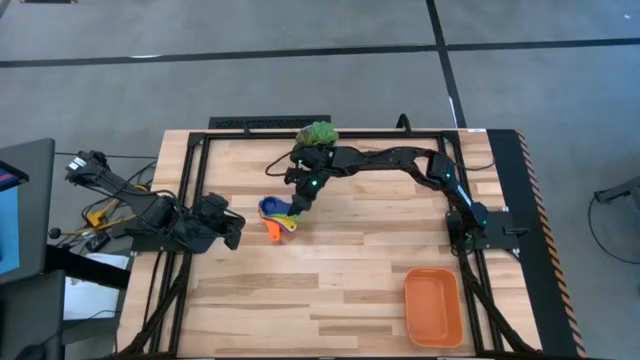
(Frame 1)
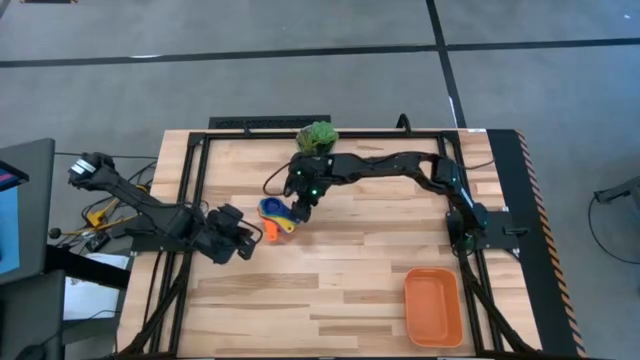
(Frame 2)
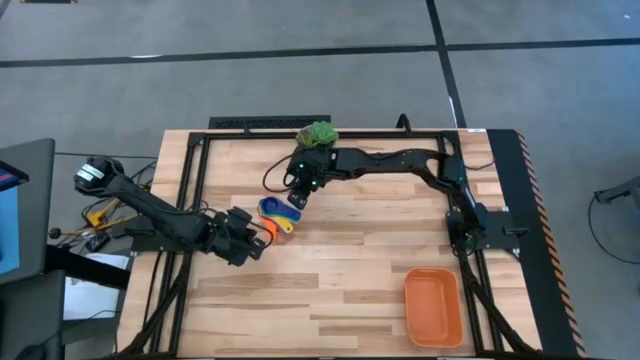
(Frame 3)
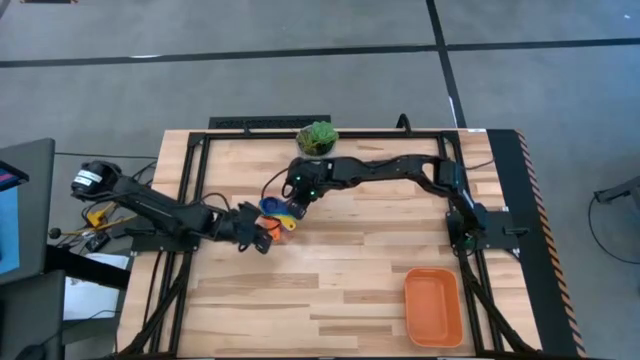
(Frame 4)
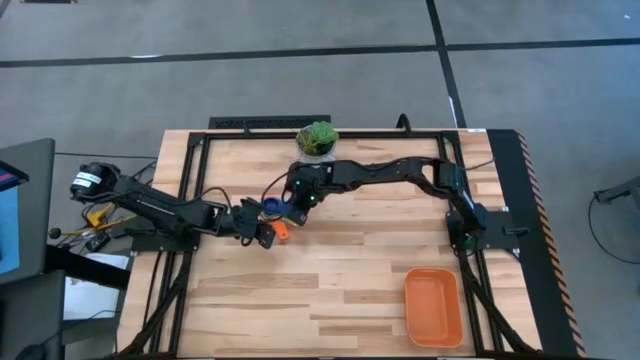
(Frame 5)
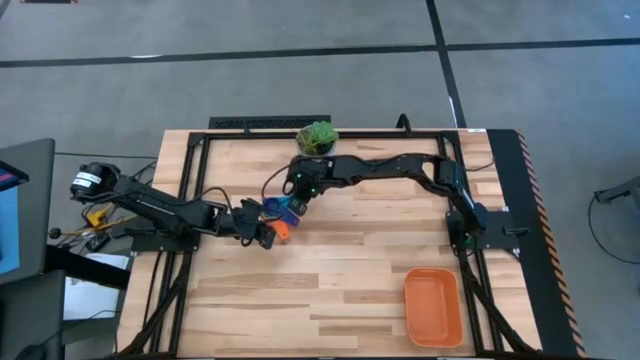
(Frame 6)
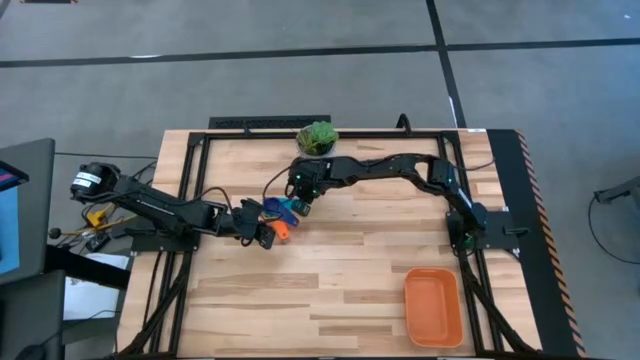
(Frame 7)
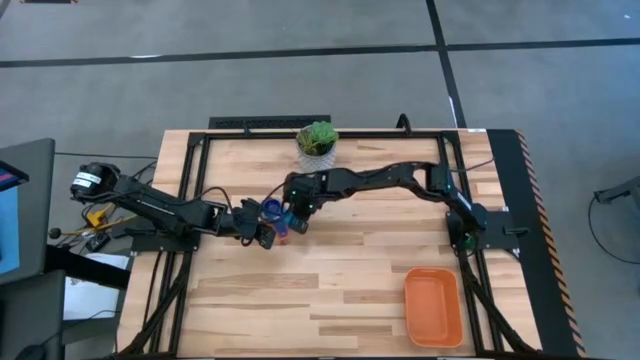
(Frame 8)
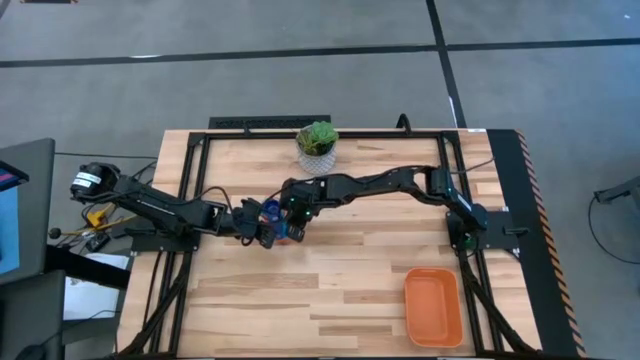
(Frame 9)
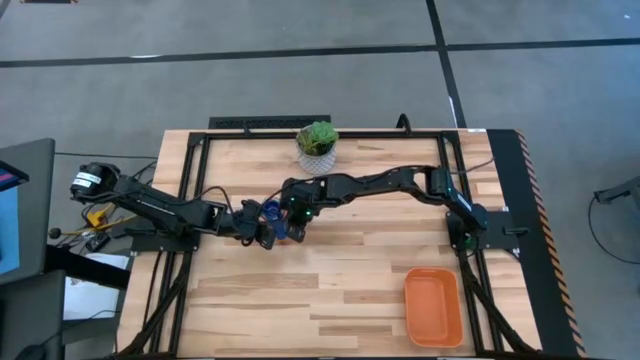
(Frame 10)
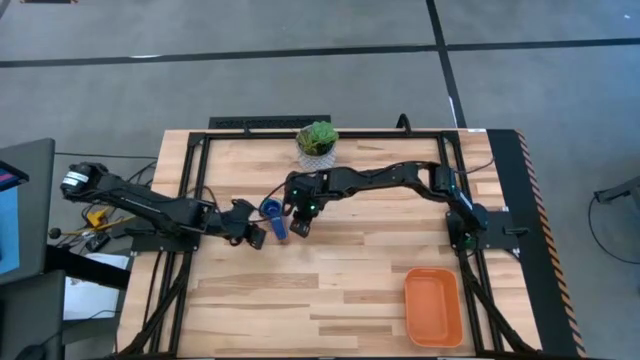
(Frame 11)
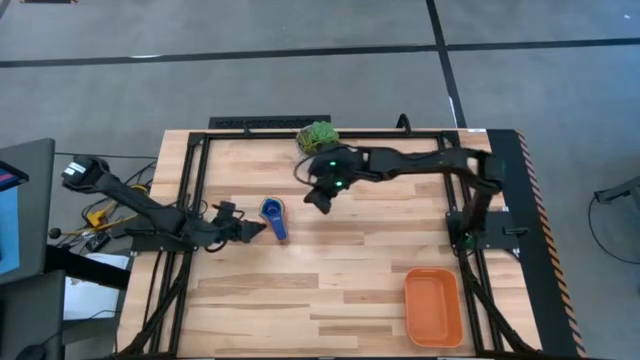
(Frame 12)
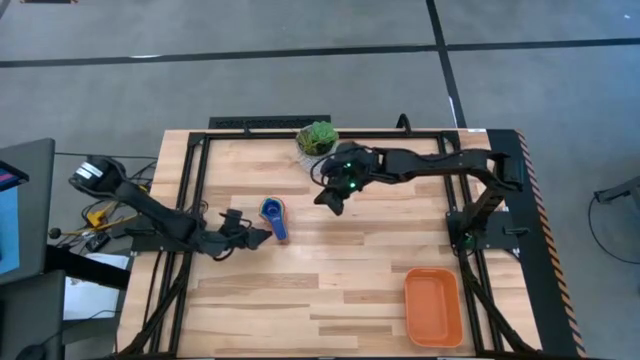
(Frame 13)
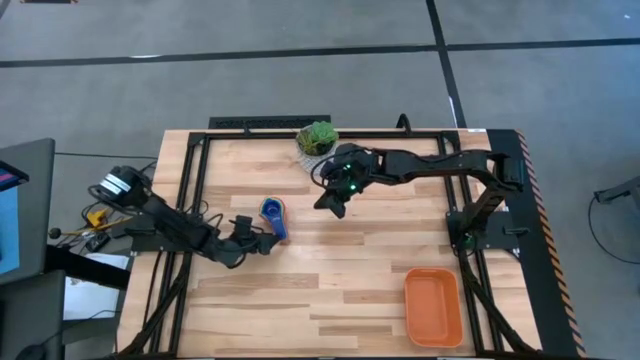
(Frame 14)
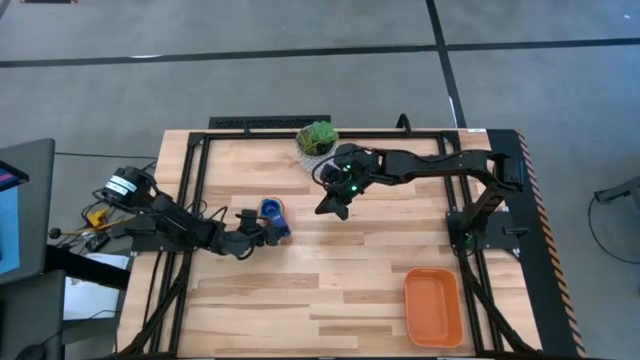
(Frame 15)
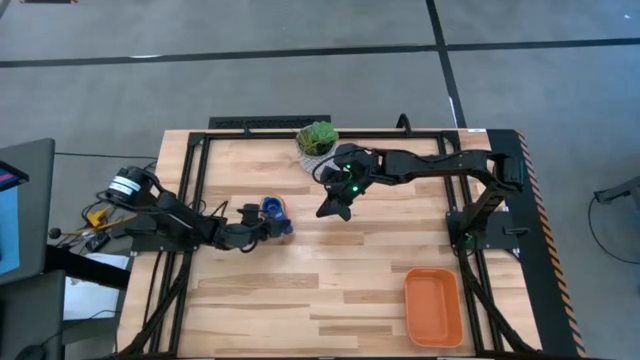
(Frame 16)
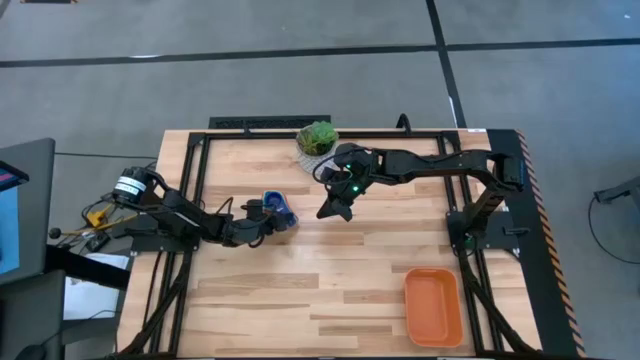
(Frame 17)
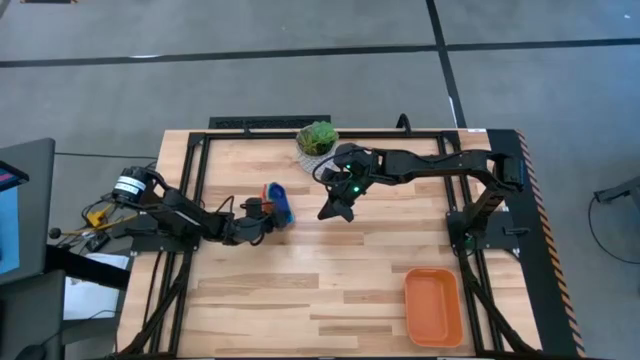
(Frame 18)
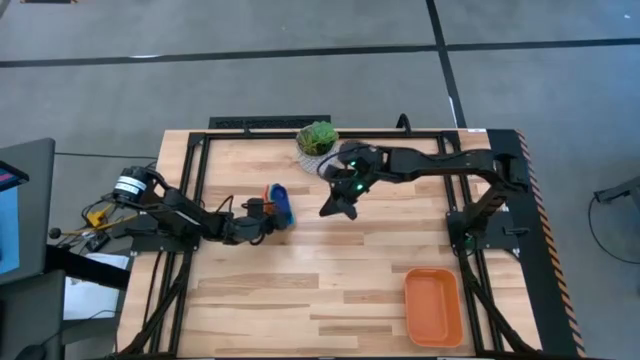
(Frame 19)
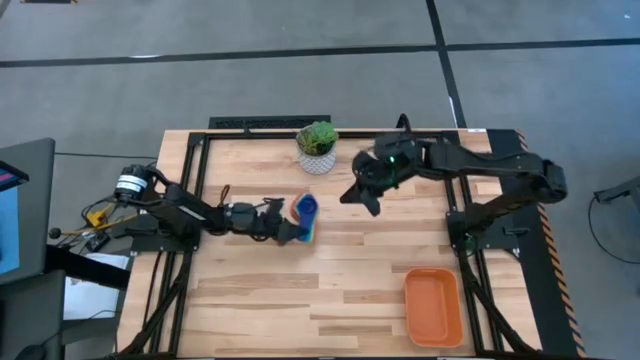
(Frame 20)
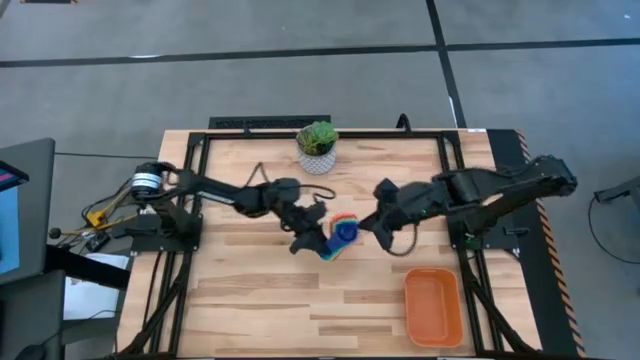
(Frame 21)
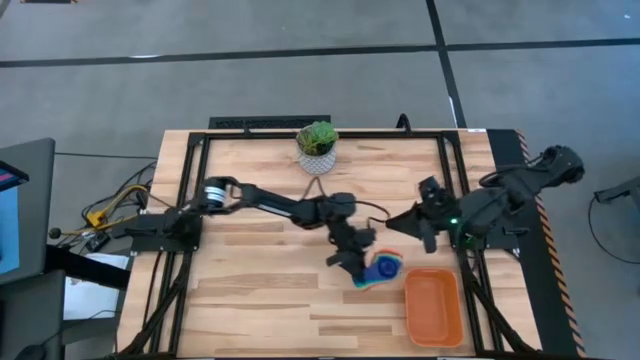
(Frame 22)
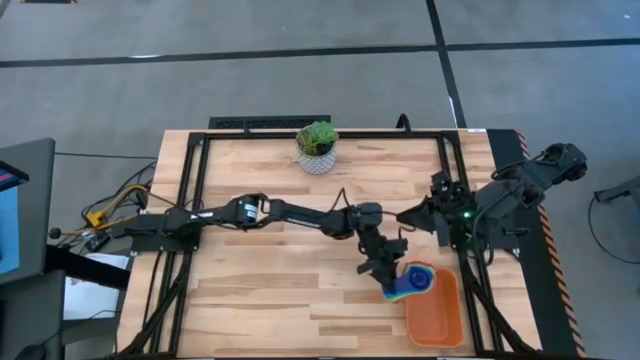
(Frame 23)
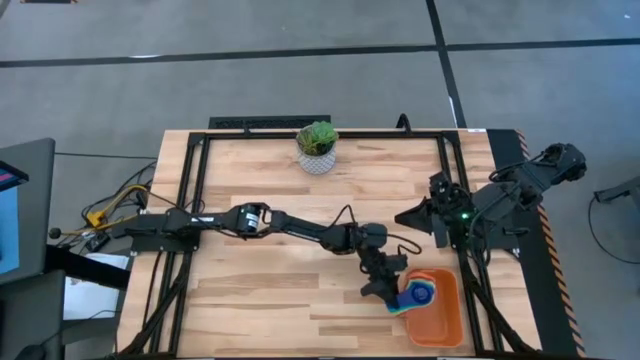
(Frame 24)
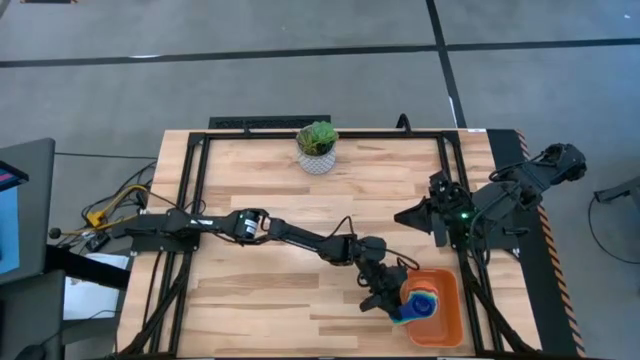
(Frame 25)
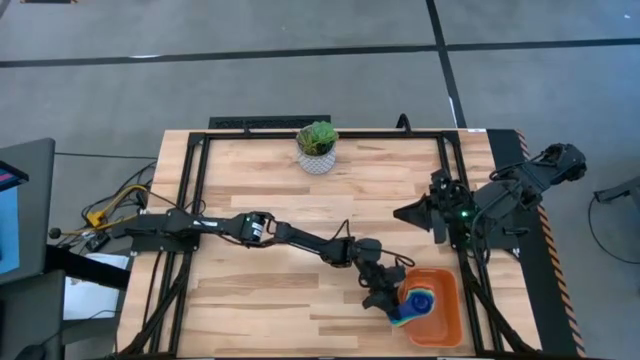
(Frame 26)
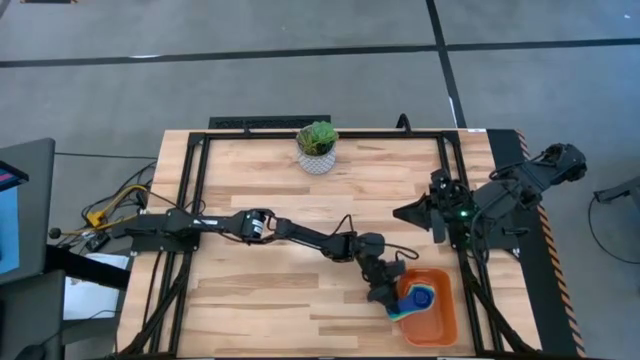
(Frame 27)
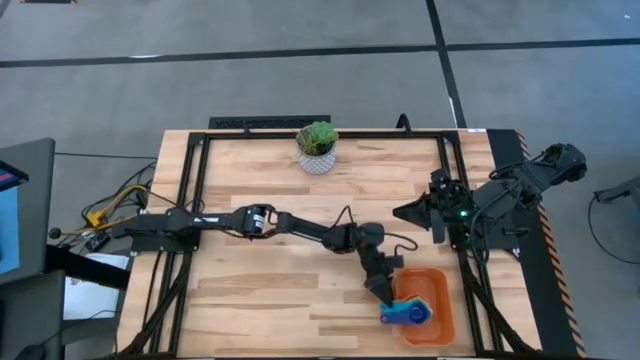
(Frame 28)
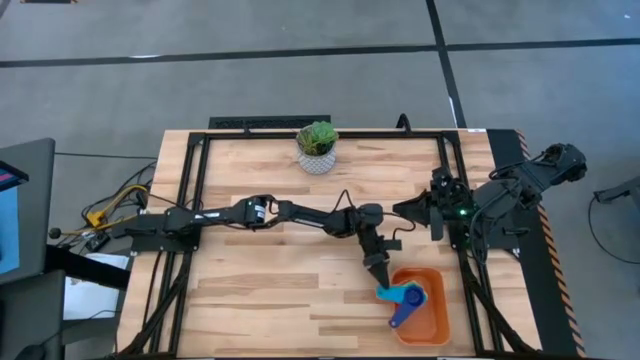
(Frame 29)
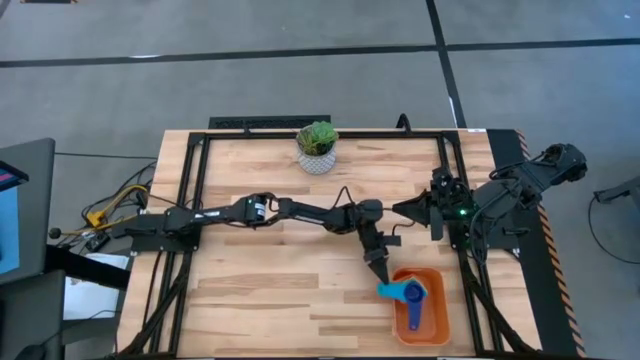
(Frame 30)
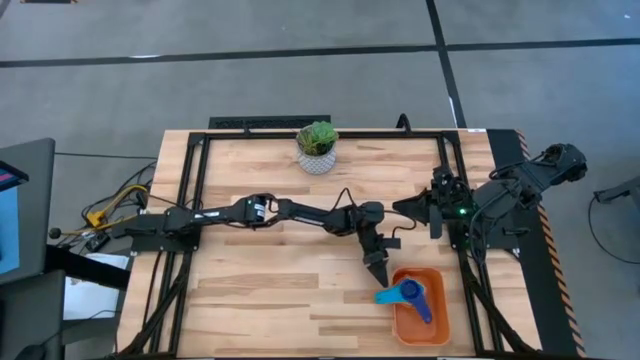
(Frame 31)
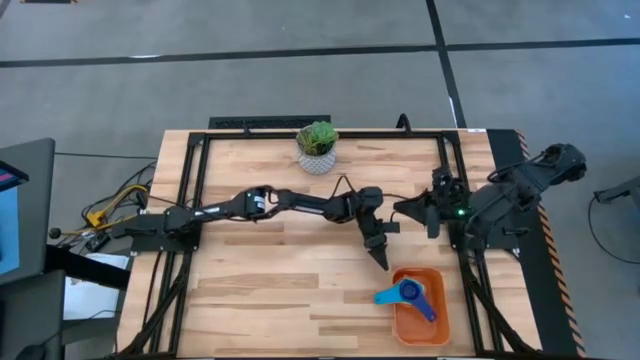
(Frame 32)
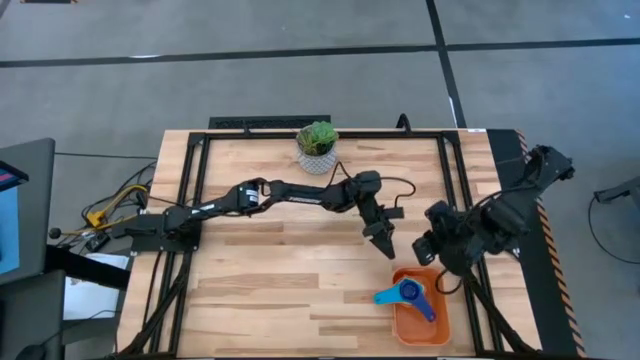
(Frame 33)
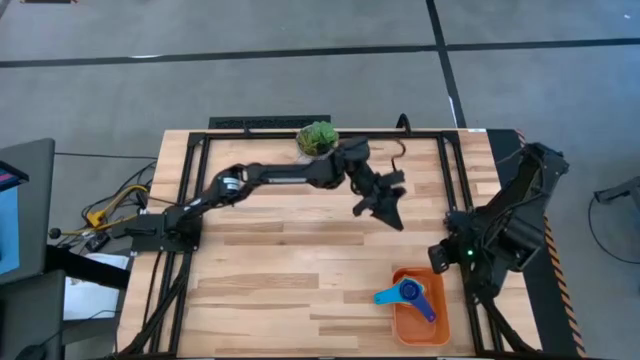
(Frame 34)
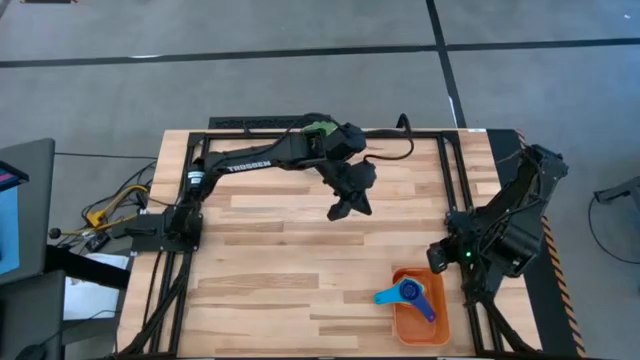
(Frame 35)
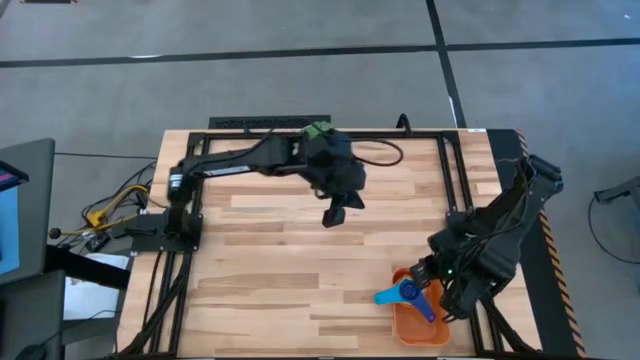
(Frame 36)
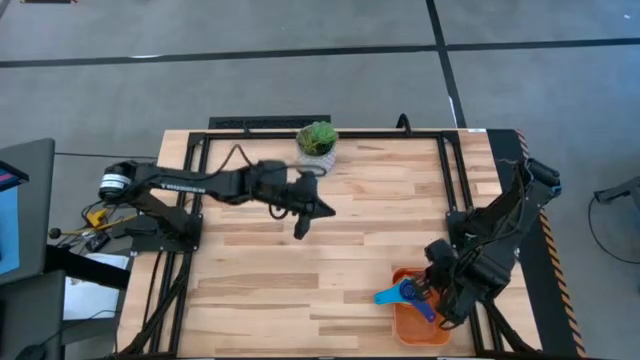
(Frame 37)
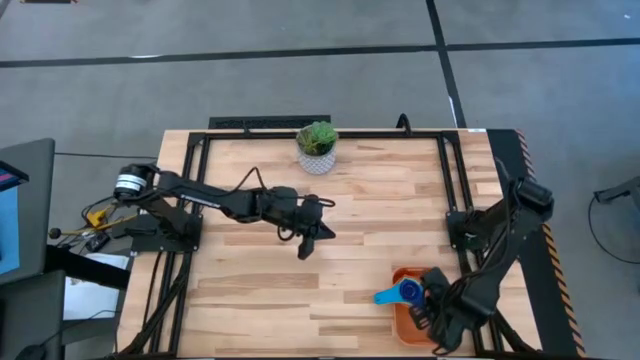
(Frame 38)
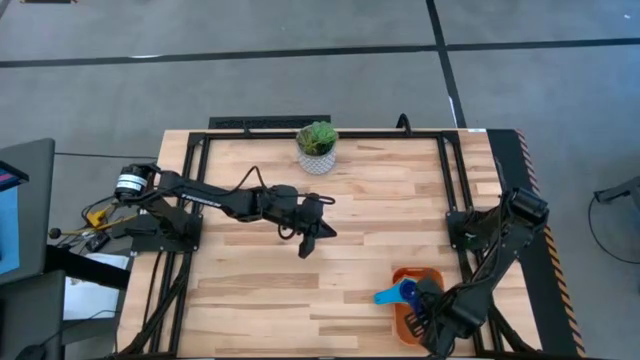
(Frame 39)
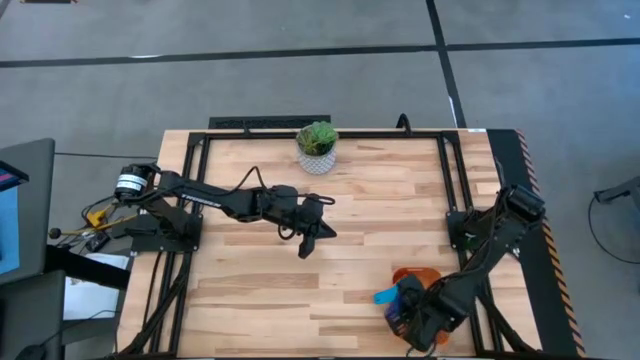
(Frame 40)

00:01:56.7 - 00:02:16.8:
Task: Nest measuring cups in basket
Put the stacked measuring cups into the orange bin

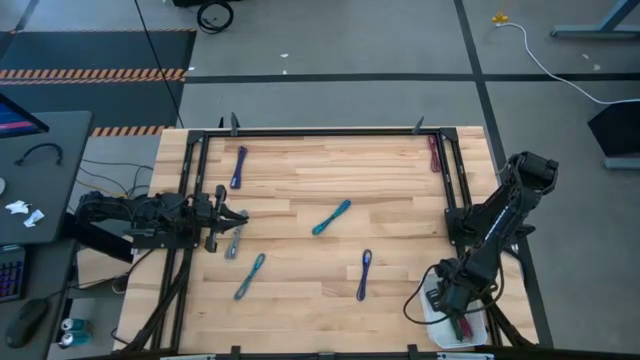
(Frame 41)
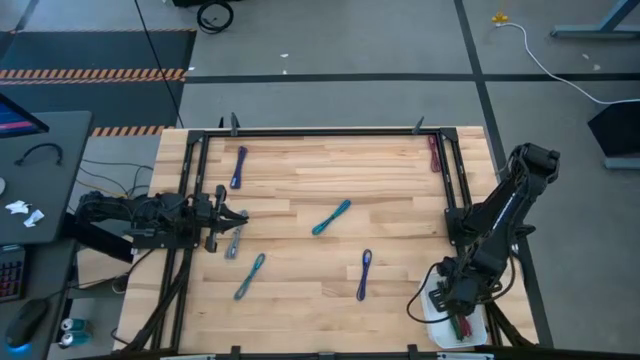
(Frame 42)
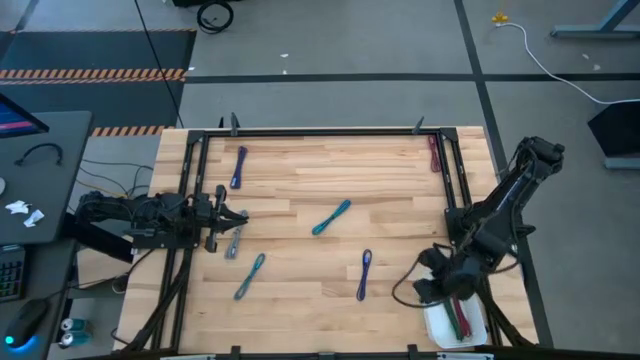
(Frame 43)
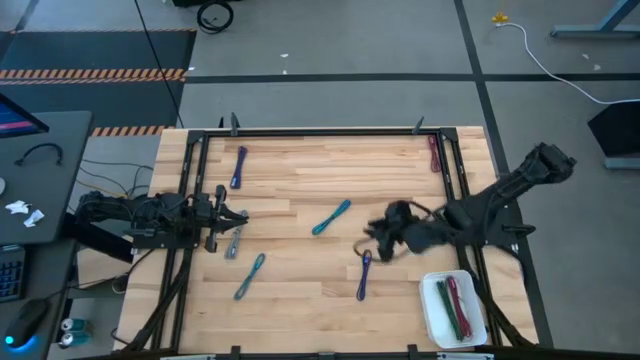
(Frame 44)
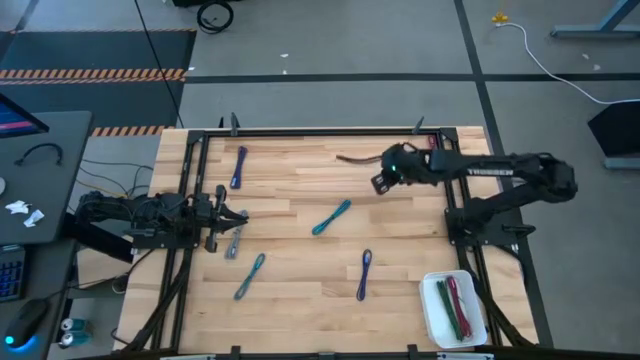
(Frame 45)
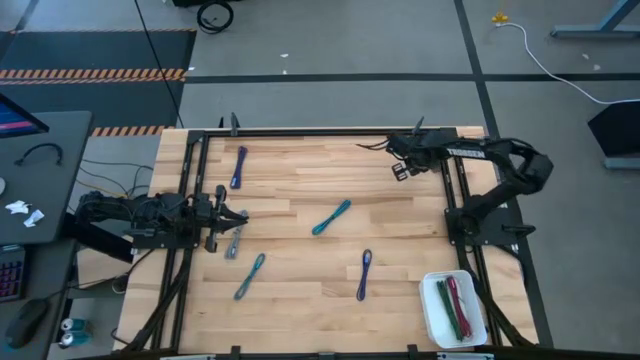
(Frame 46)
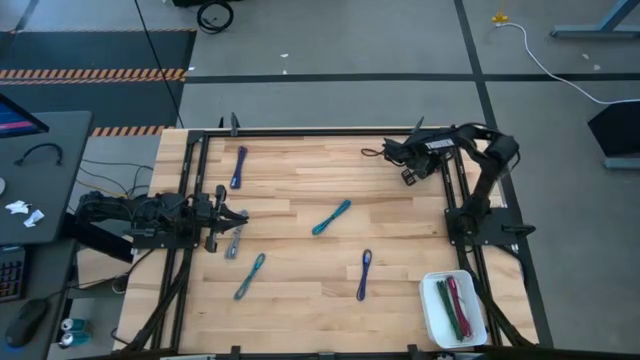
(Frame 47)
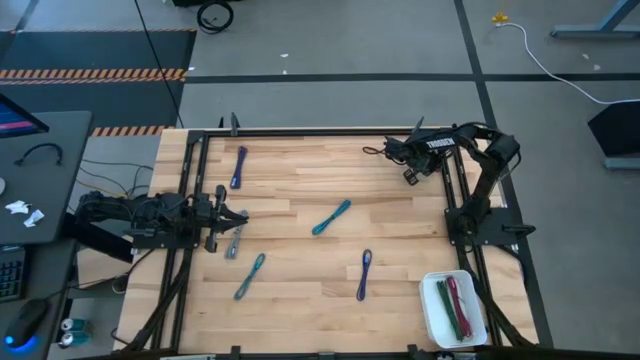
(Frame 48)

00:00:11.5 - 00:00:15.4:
Task: Pick and place USB-C Cables
Put the pink charger cable into the white bin
